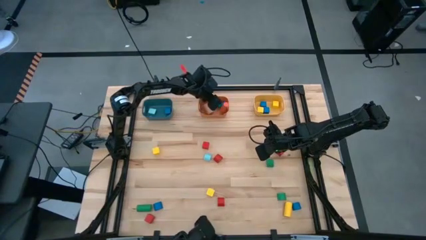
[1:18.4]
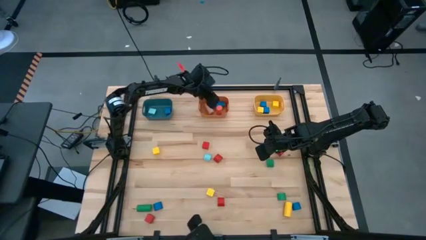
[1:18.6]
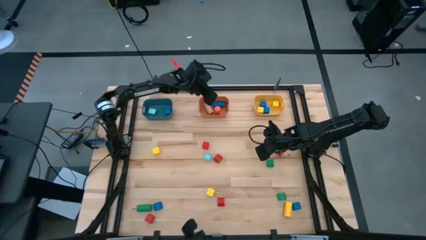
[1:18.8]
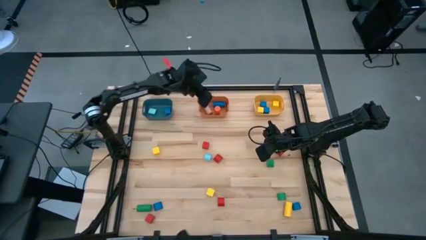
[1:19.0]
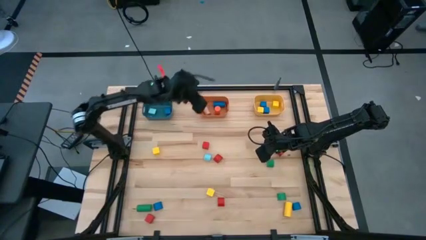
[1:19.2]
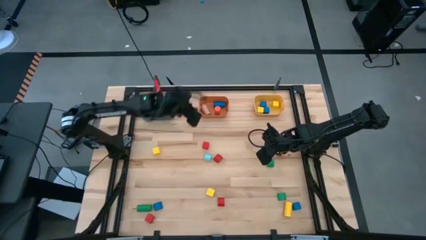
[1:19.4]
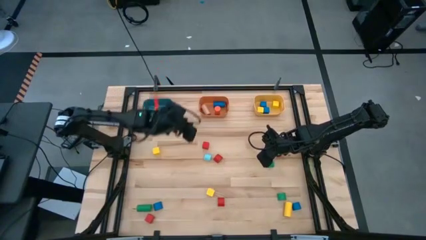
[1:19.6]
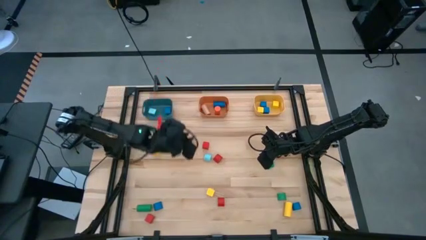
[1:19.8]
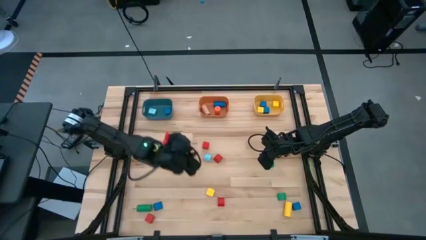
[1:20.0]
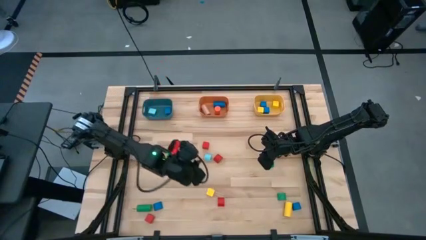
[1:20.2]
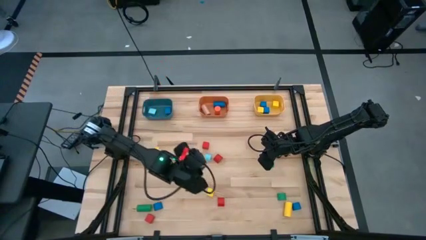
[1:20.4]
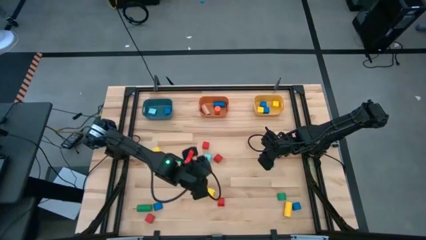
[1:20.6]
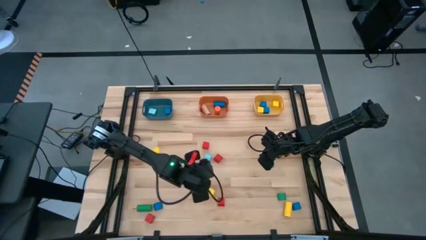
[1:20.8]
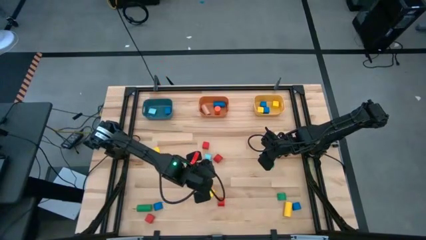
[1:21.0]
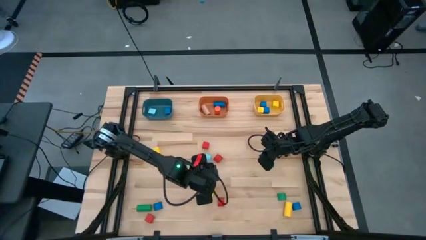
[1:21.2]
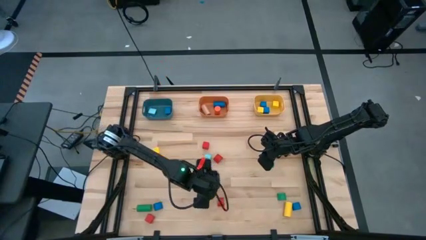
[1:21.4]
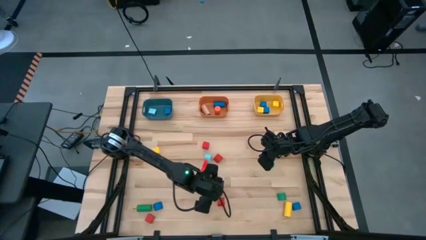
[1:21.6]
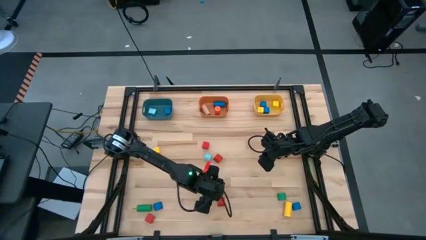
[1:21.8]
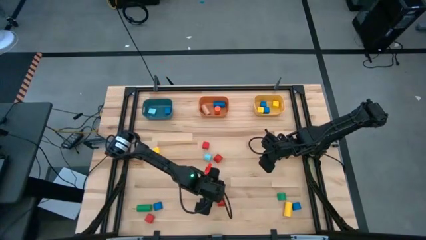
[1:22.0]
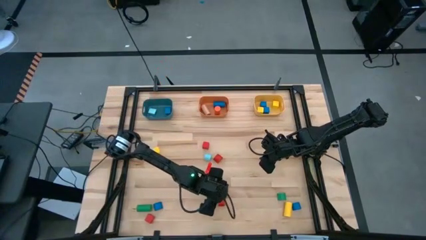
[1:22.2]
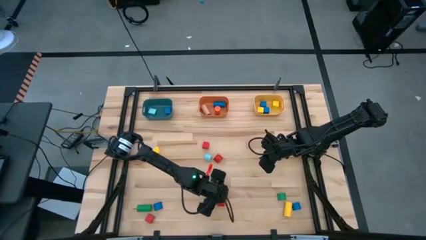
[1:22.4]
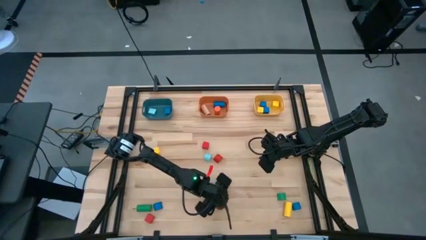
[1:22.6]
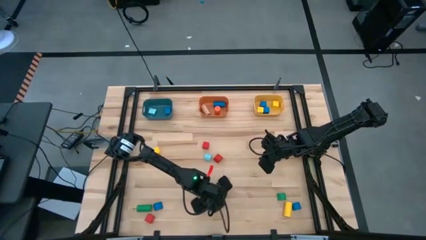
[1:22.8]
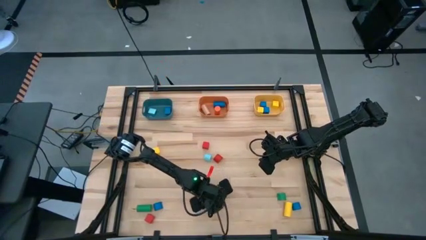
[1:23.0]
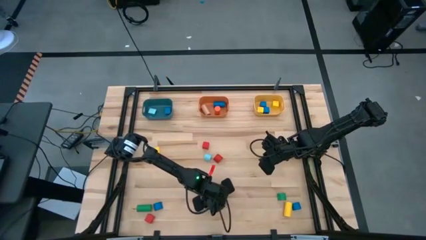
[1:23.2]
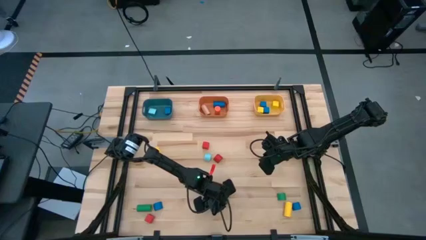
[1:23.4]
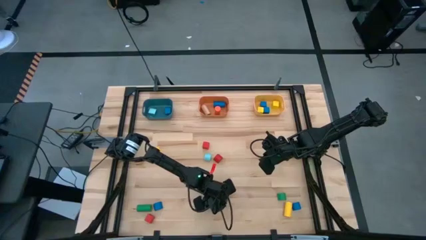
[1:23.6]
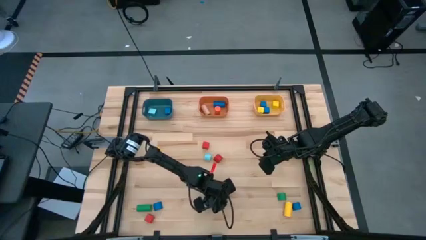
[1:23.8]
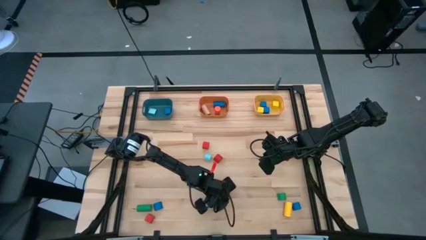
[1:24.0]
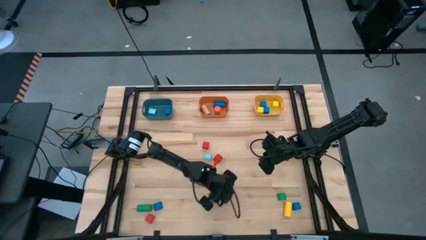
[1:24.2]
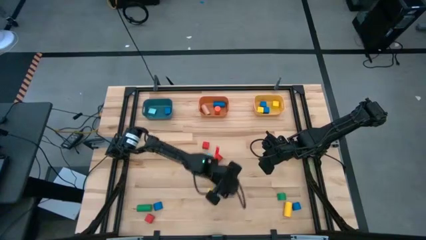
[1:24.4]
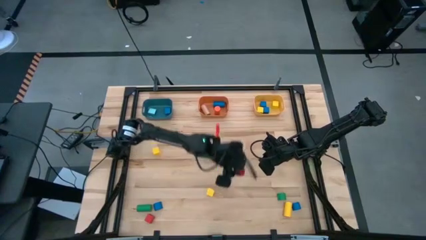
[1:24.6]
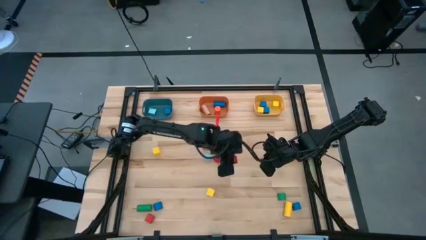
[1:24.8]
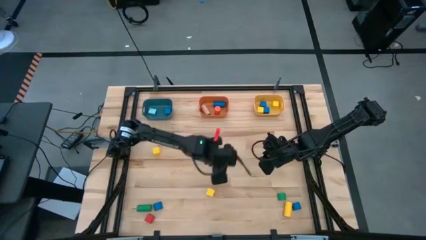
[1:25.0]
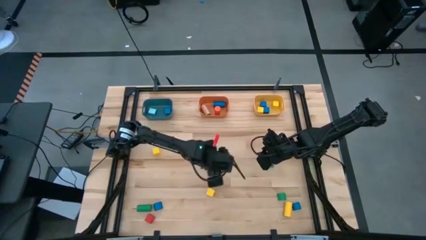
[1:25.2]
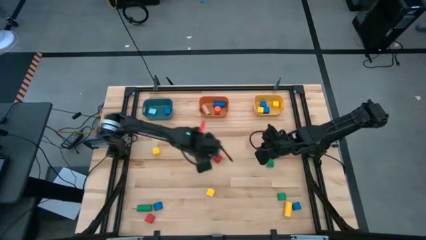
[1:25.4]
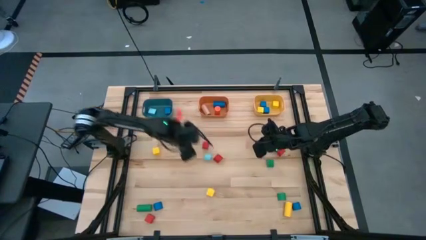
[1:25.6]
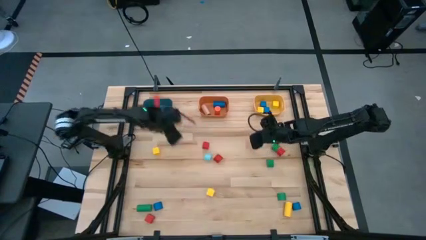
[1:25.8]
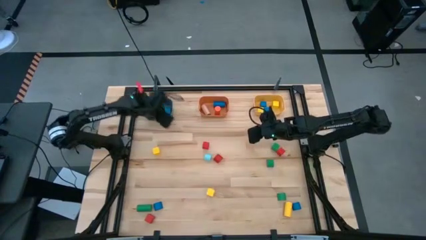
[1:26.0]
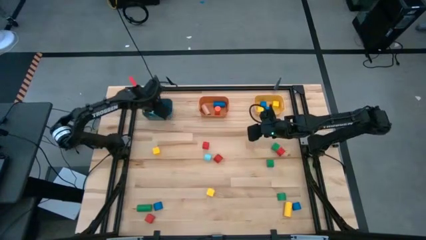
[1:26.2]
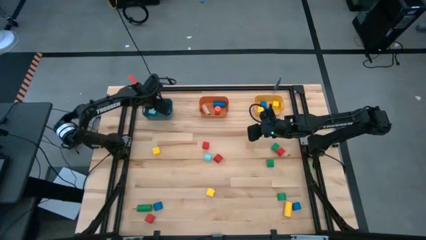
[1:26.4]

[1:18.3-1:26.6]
Task: Sort blocks by size
Put the red half-circle block into the blue bin

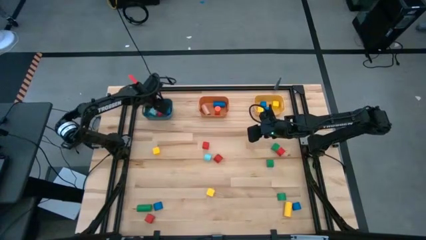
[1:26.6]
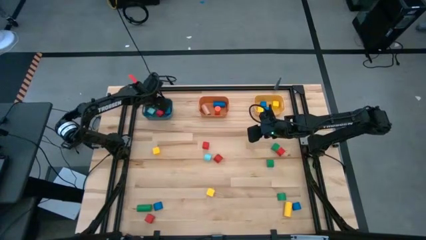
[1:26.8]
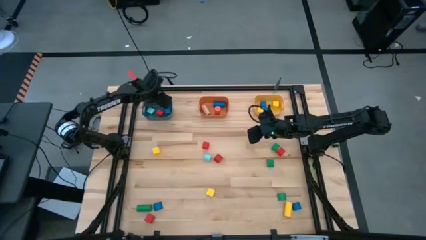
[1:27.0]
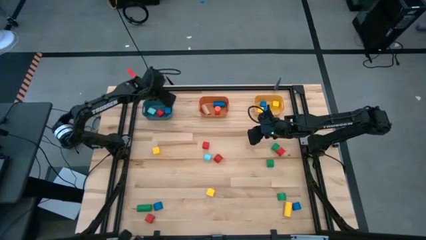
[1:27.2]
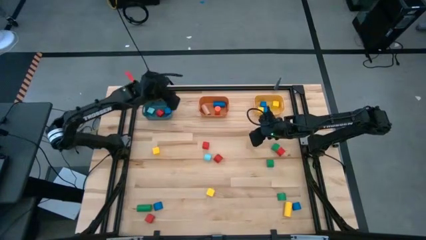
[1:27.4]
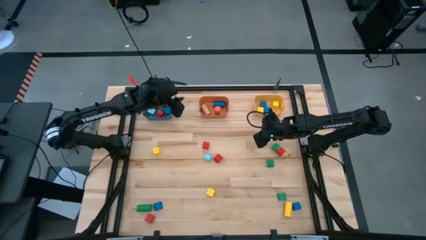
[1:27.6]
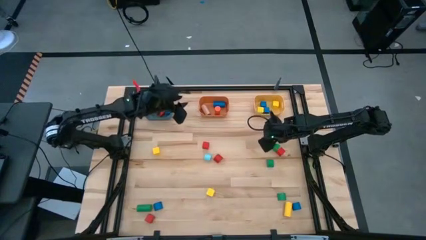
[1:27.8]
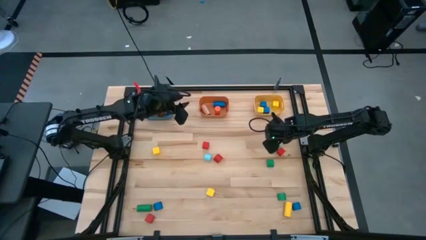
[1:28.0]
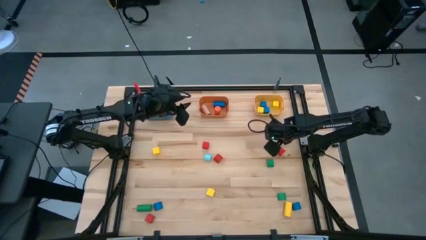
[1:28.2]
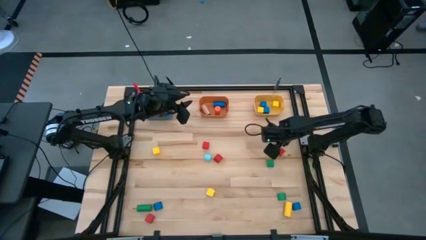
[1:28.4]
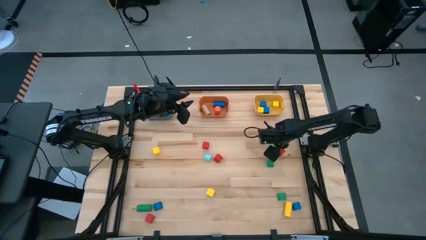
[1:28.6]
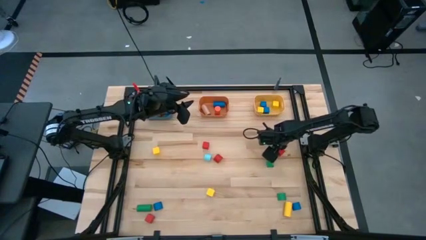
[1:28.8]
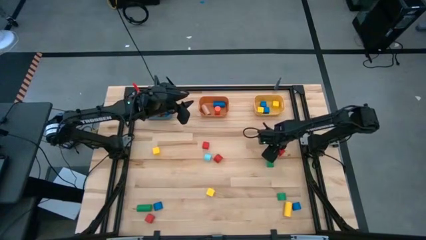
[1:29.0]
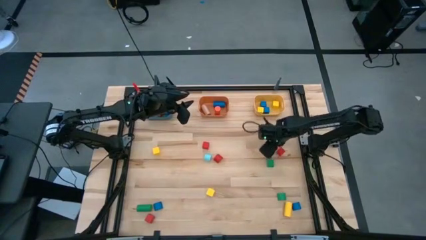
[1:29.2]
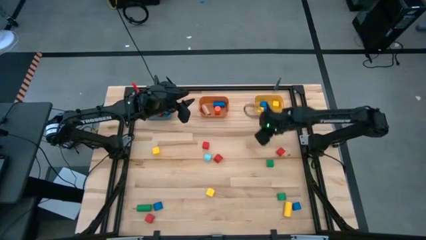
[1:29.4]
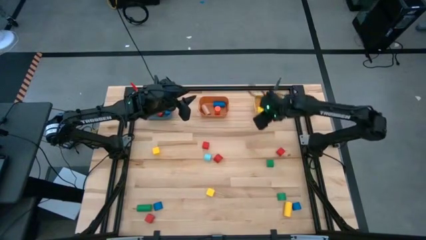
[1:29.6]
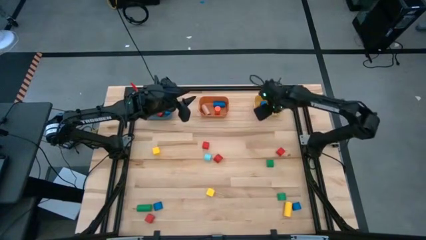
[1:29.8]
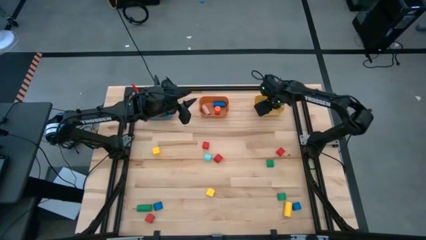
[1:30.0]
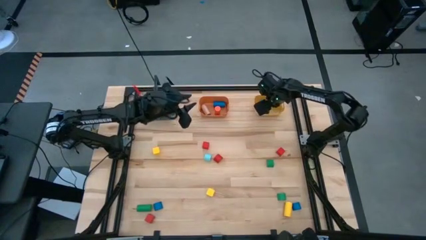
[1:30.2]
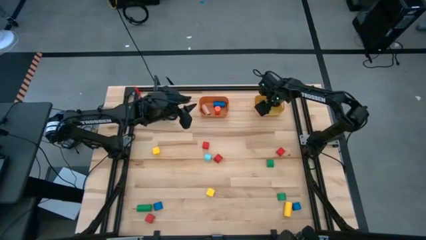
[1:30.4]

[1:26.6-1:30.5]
Put the green cube block into the yellow bin

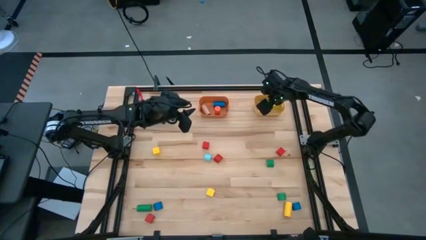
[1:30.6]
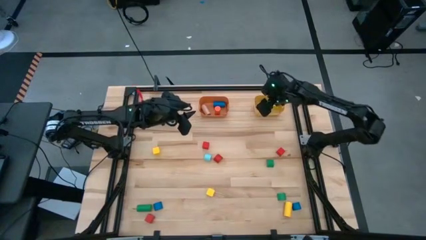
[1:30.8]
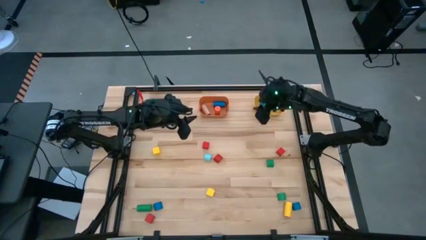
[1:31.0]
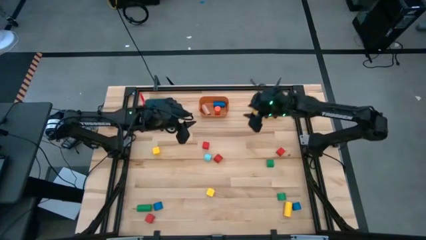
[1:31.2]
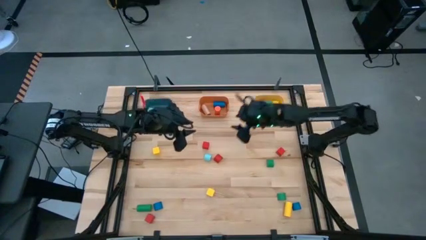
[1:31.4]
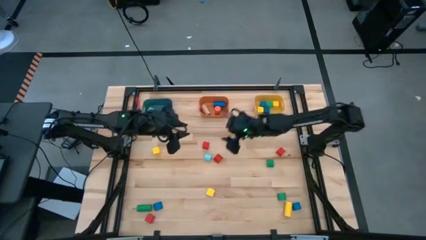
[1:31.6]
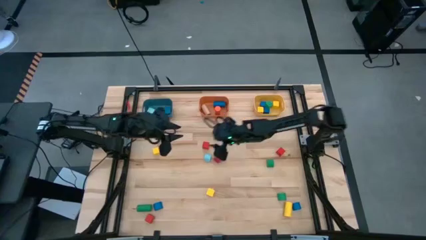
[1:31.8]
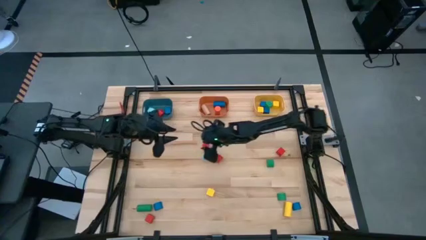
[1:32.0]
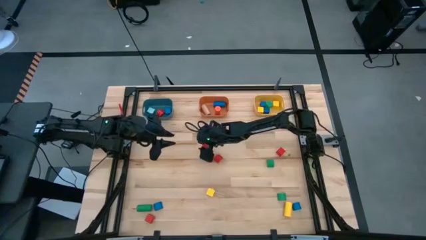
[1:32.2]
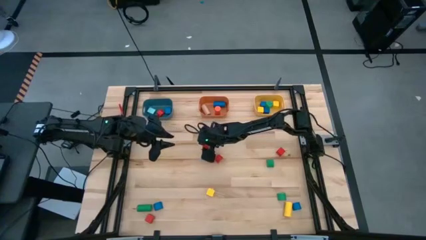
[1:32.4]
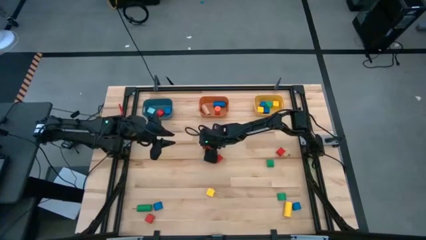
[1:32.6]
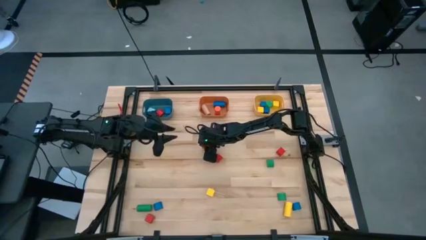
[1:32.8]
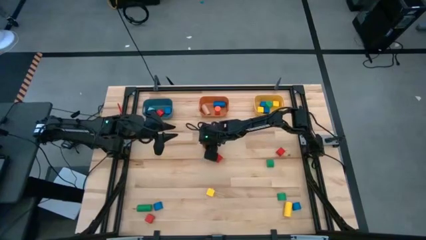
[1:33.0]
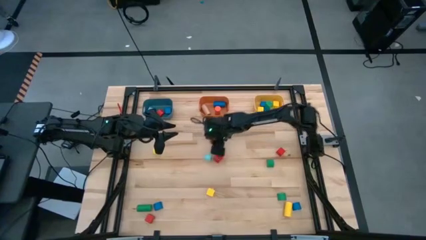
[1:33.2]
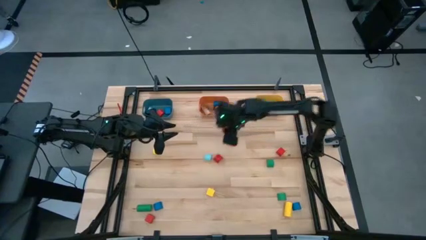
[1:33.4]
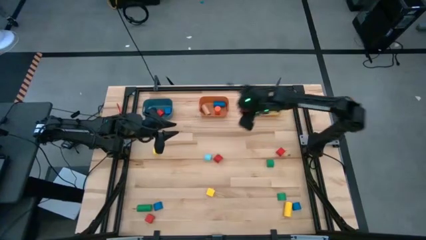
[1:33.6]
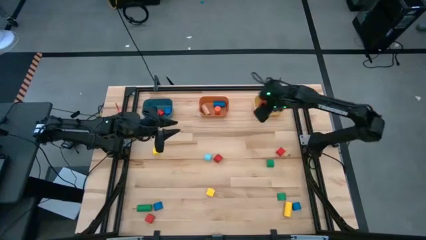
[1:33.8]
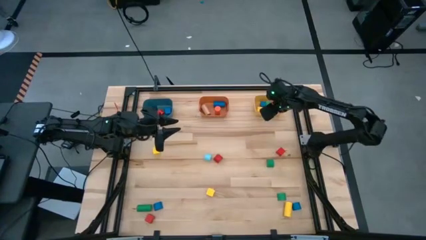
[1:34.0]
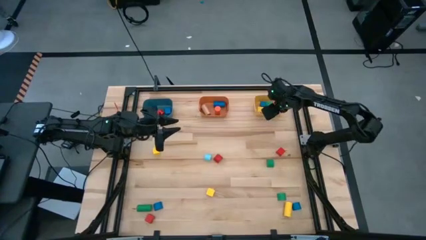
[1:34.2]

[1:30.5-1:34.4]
Put the red cube block into the yellow bin

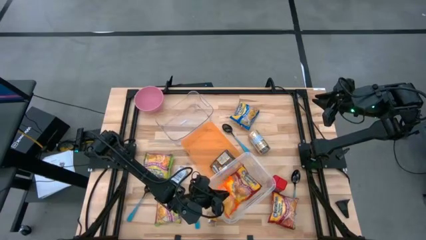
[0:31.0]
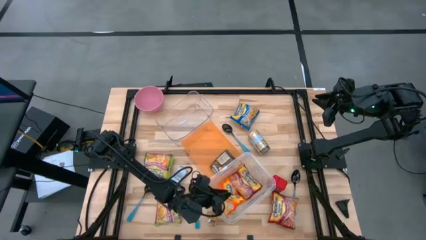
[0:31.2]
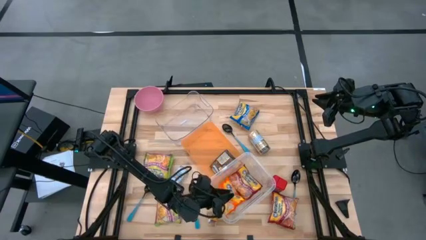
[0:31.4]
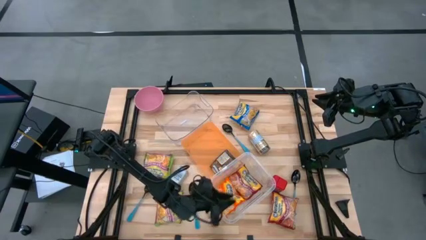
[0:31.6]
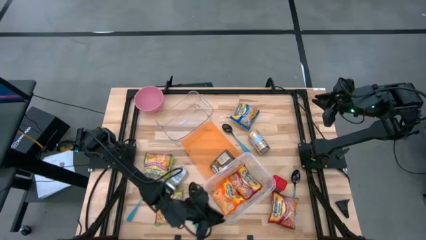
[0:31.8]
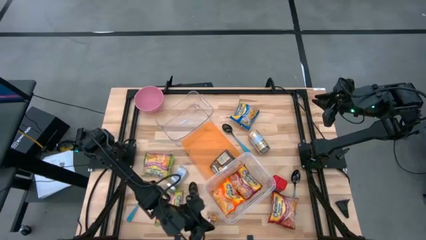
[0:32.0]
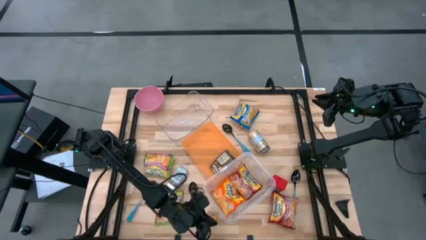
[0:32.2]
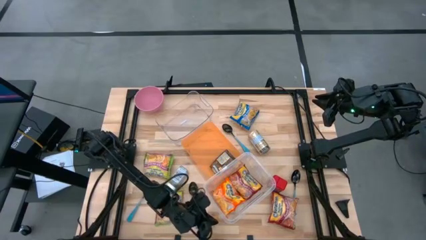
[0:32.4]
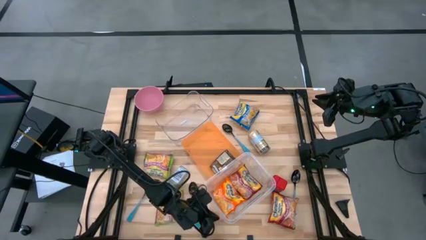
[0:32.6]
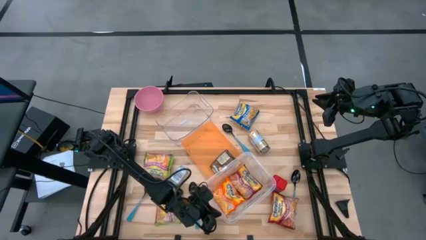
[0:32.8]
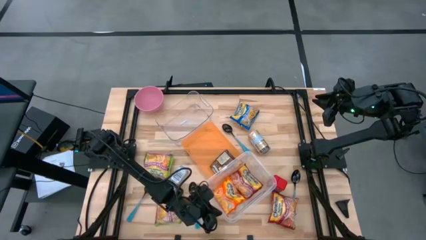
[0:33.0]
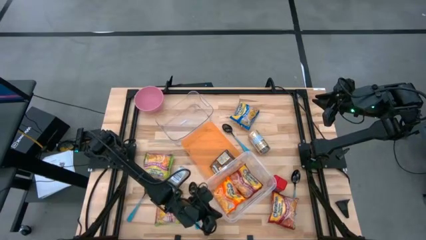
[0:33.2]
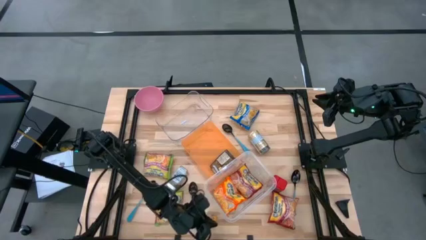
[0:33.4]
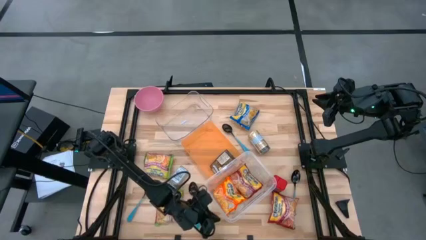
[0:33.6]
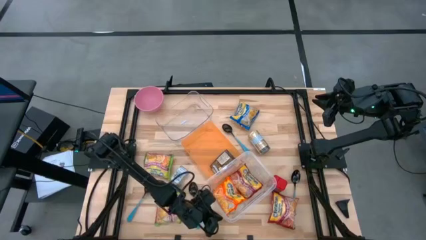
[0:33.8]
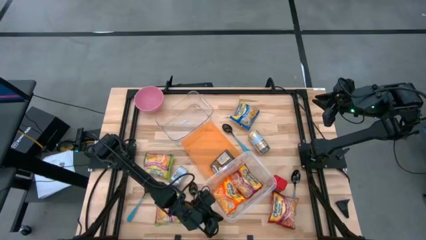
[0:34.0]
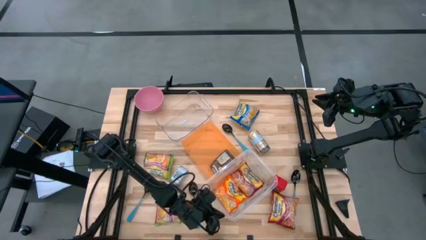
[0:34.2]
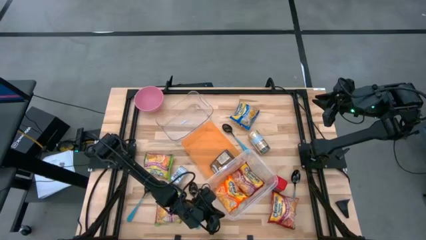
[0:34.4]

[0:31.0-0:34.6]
Task: Pick & Place Food Item
Adjust the bottom bin
